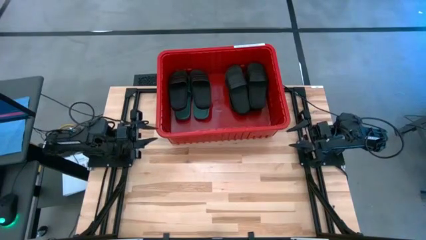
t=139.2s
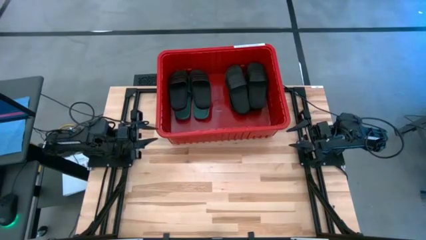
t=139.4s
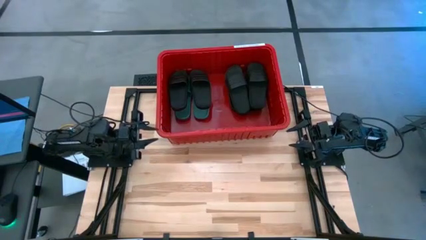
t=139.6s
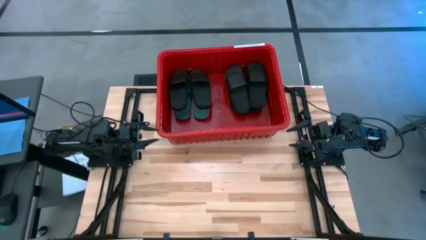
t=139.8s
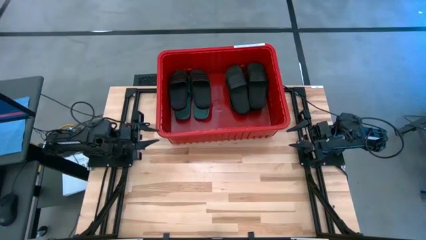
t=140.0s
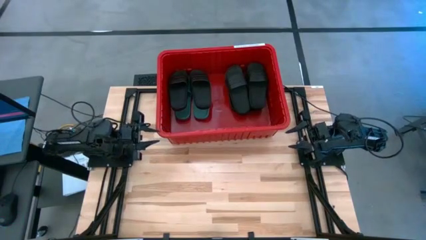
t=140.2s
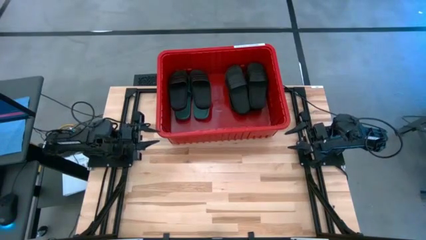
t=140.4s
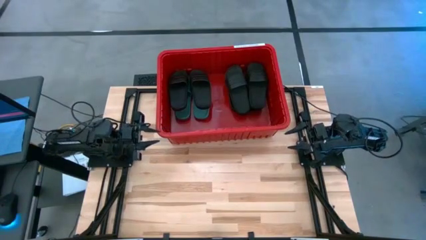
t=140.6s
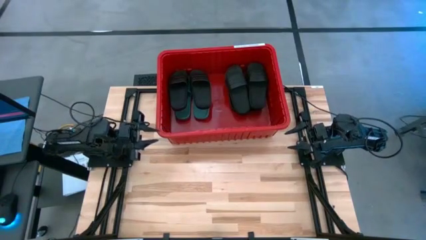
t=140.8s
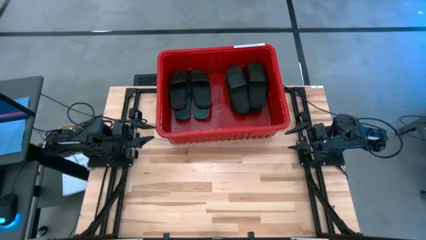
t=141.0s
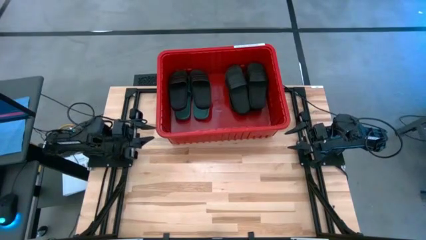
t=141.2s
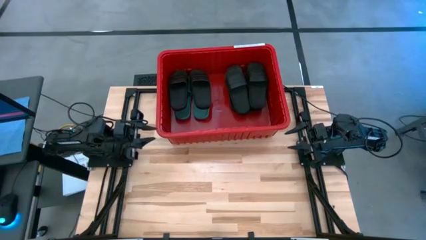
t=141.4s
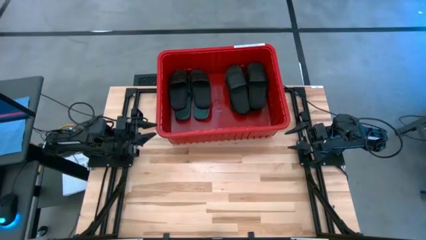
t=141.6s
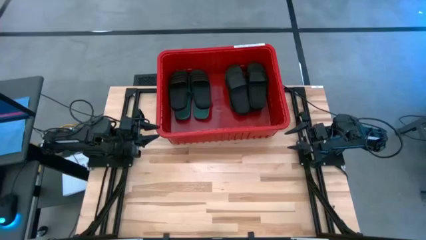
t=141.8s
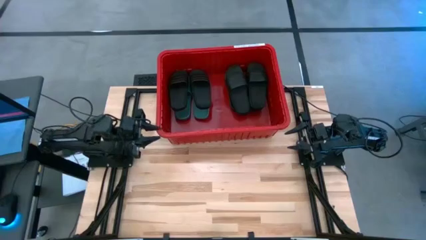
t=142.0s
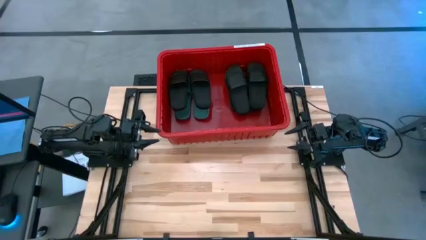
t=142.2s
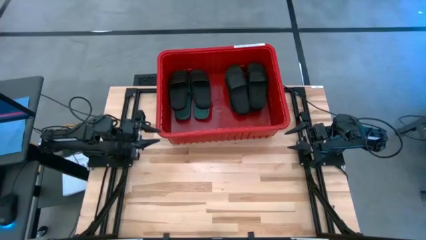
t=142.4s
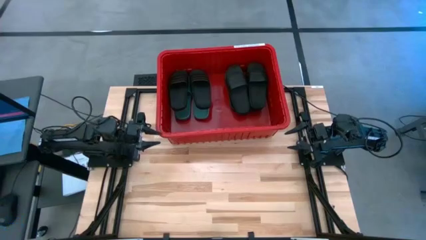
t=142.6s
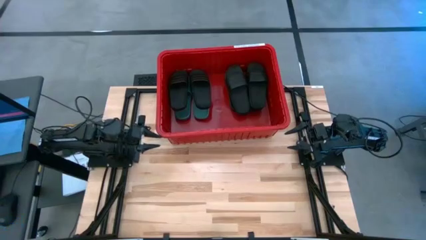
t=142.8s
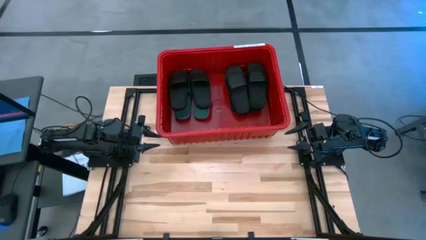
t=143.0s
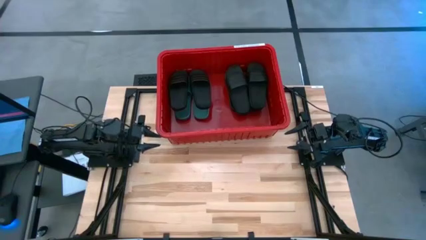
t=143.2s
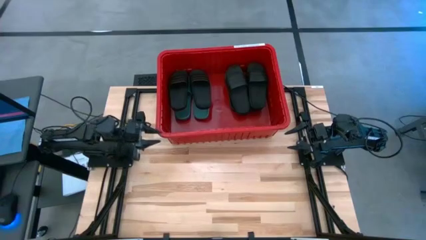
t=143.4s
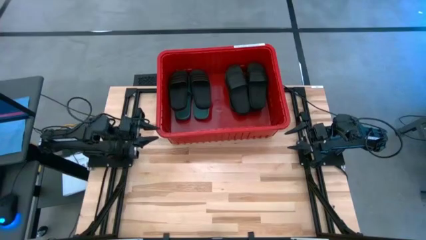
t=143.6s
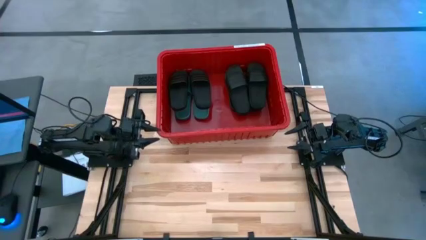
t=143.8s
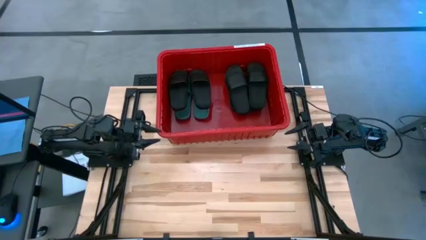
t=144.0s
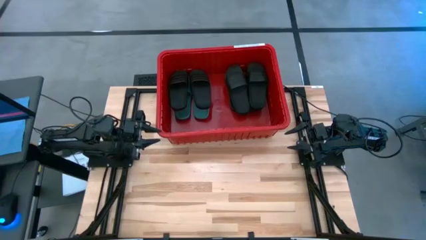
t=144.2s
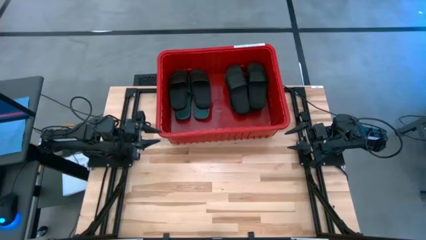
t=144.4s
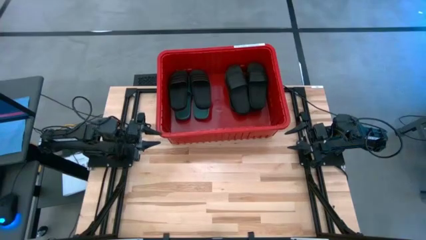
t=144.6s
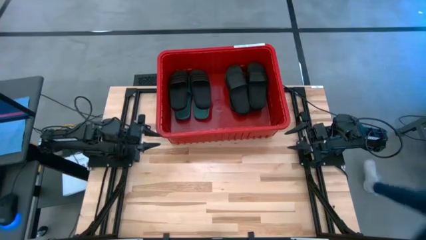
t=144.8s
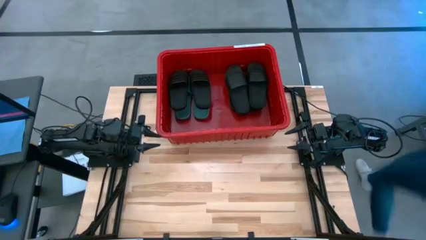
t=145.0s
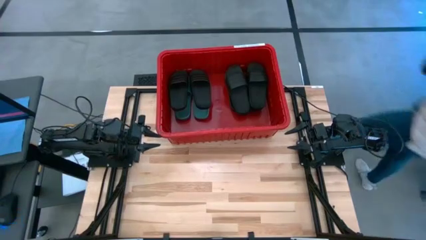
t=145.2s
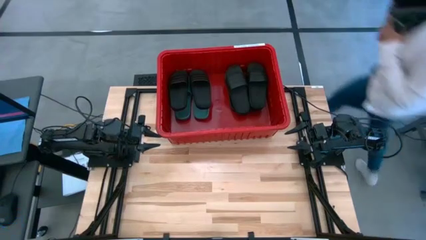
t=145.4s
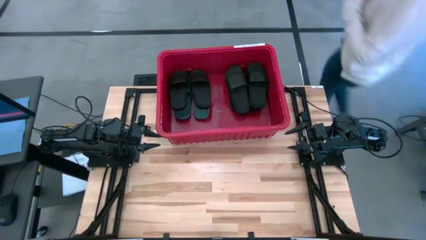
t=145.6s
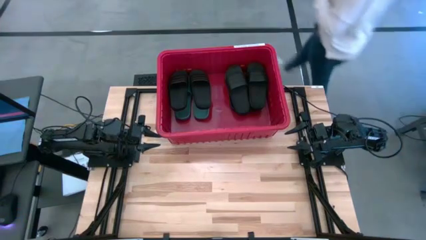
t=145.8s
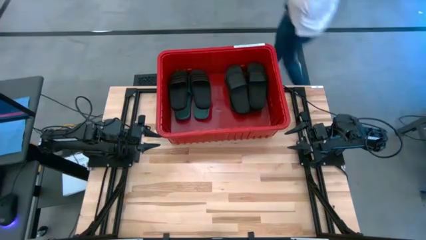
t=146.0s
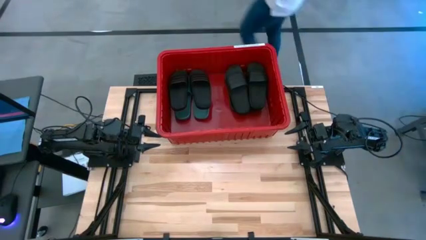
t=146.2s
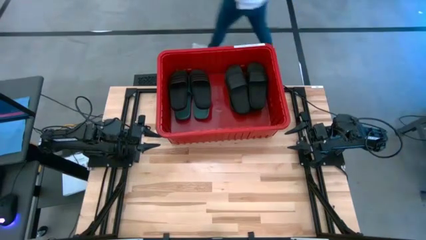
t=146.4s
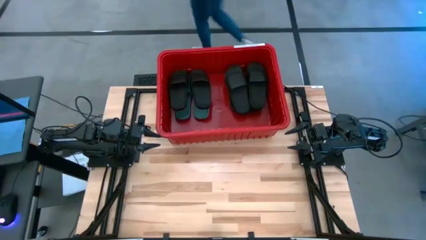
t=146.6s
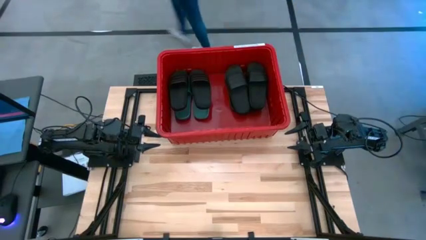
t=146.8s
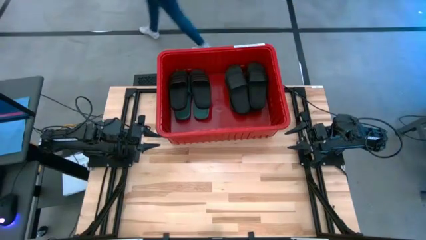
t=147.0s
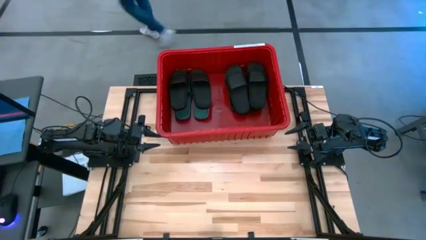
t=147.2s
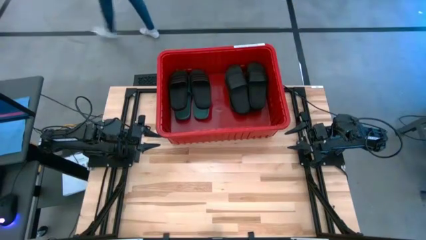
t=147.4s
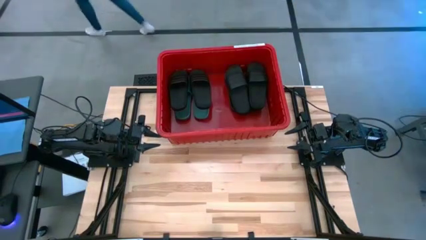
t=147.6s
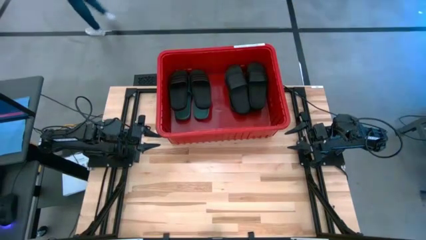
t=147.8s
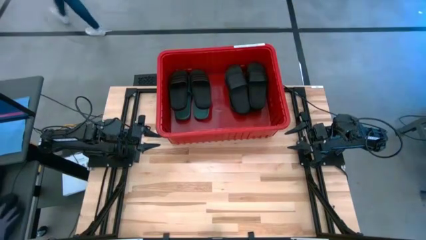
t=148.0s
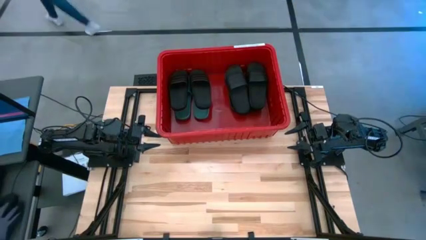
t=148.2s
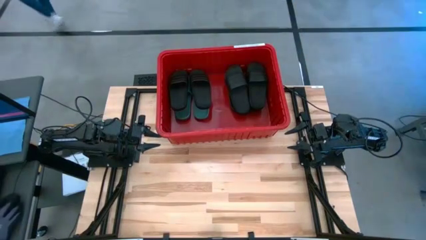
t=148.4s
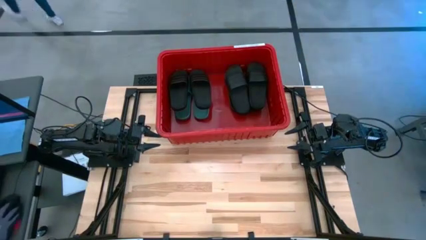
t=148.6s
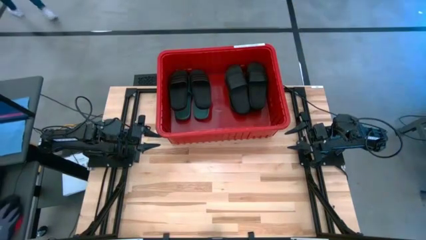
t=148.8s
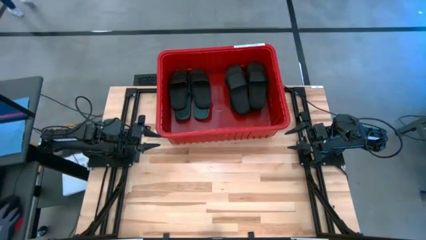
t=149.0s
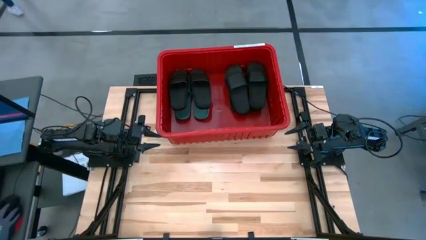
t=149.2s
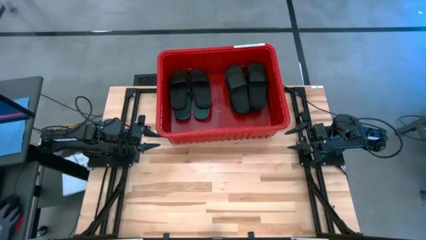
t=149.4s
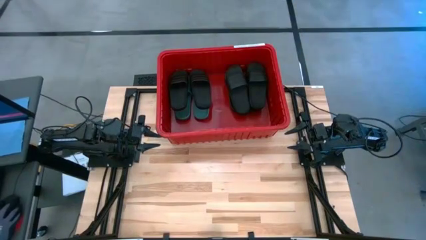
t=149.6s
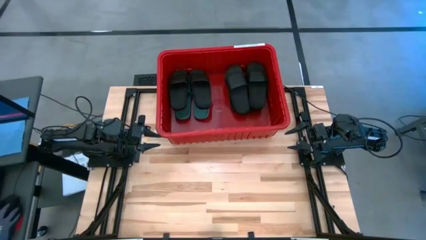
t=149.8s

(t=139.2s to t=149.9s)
Task: Pick and place slides into bin
Return to Home Position

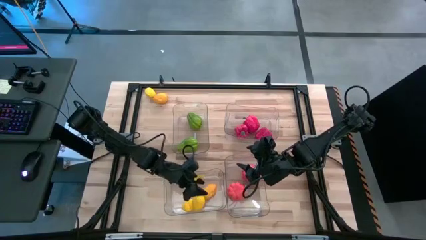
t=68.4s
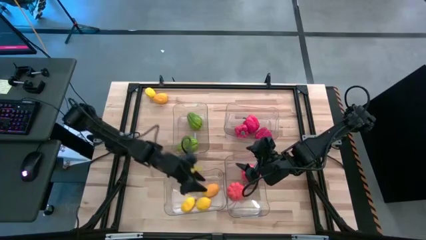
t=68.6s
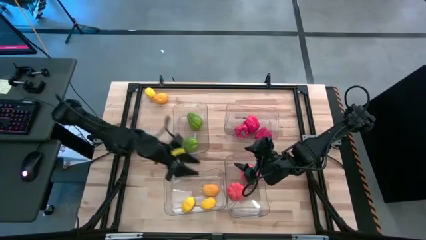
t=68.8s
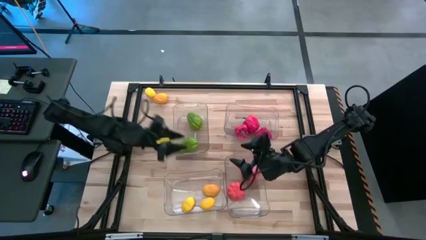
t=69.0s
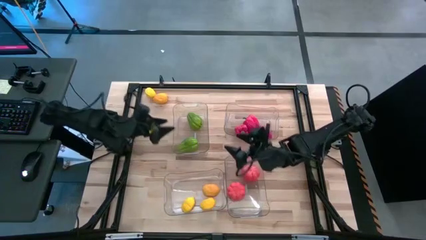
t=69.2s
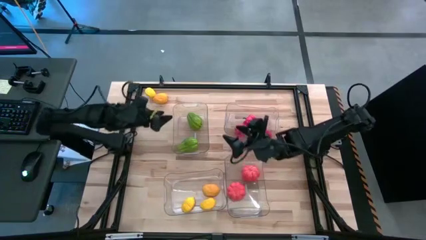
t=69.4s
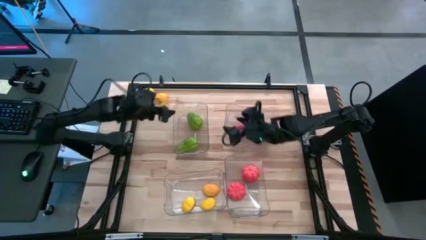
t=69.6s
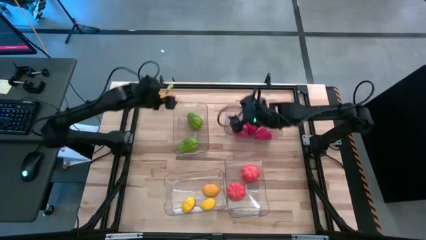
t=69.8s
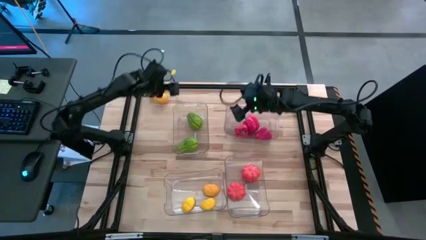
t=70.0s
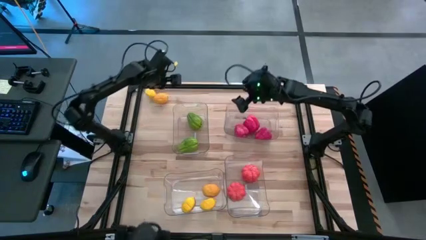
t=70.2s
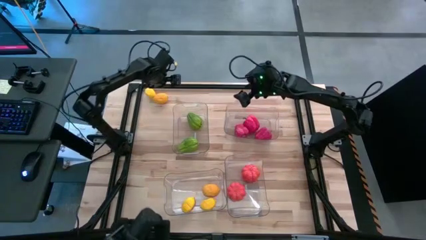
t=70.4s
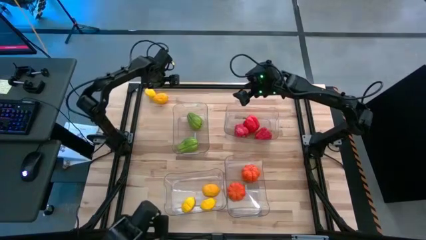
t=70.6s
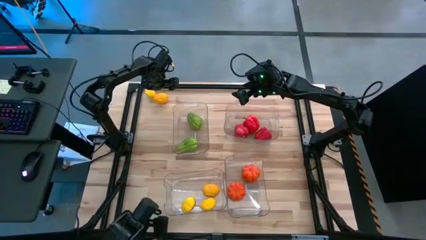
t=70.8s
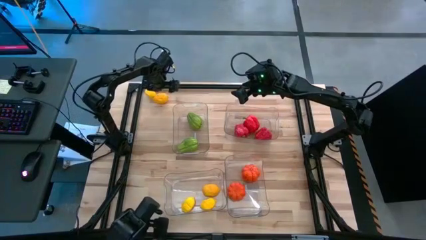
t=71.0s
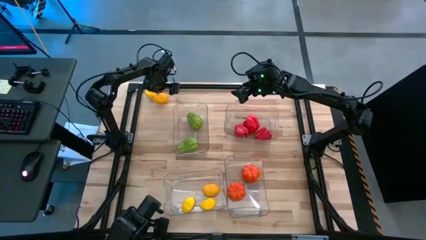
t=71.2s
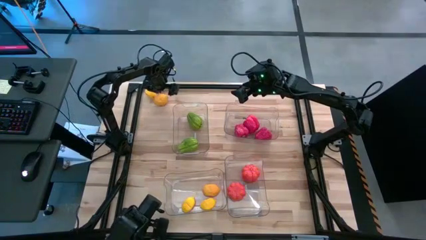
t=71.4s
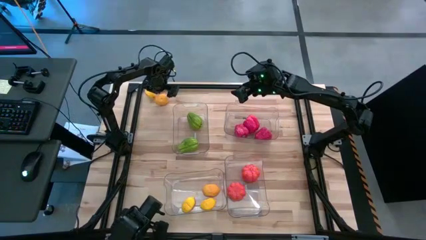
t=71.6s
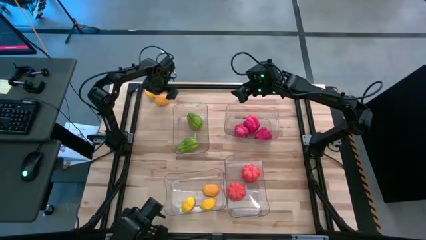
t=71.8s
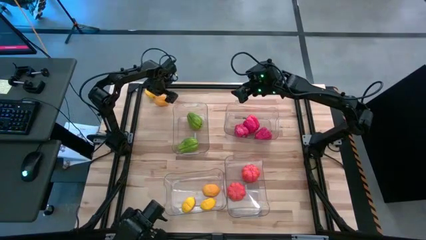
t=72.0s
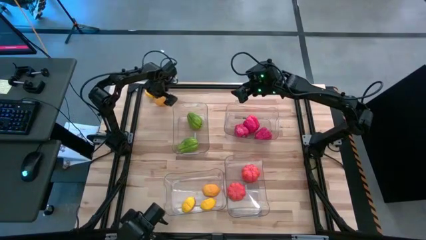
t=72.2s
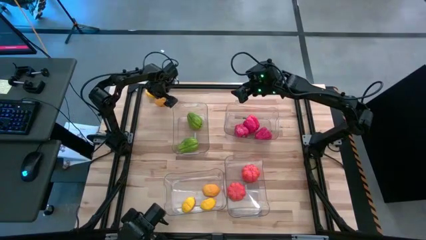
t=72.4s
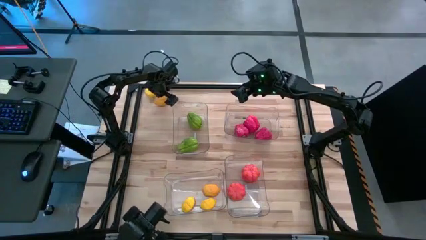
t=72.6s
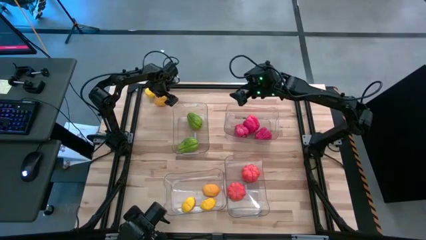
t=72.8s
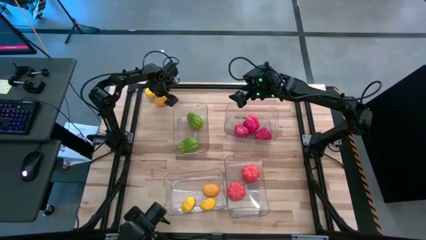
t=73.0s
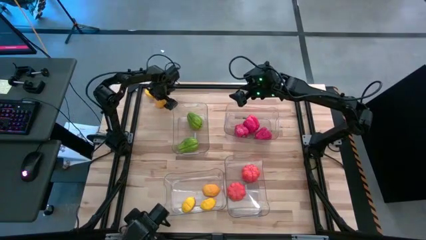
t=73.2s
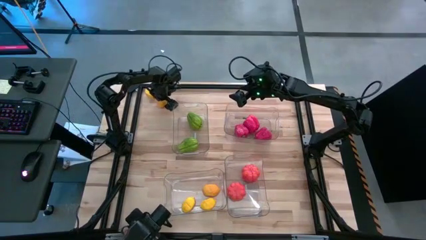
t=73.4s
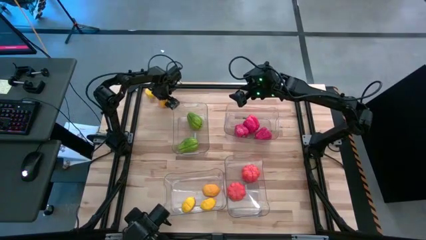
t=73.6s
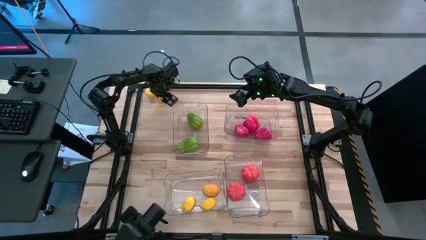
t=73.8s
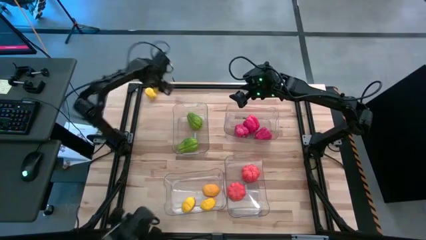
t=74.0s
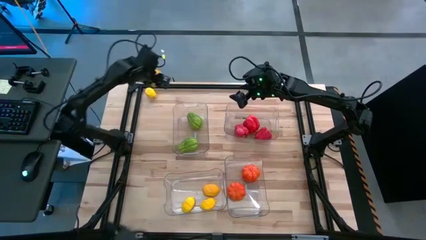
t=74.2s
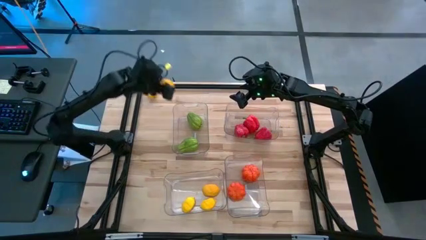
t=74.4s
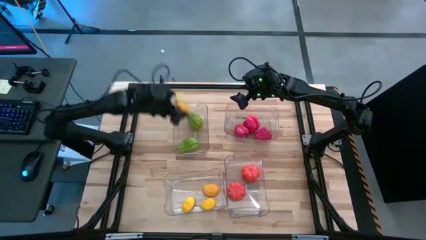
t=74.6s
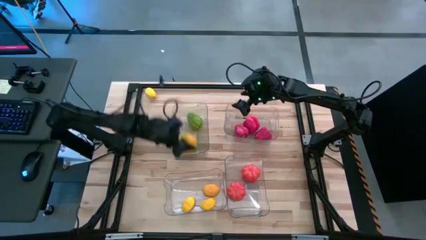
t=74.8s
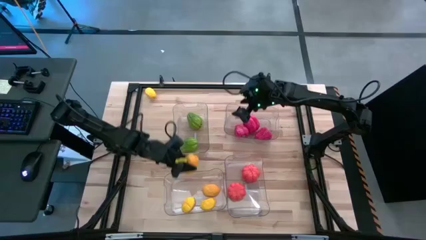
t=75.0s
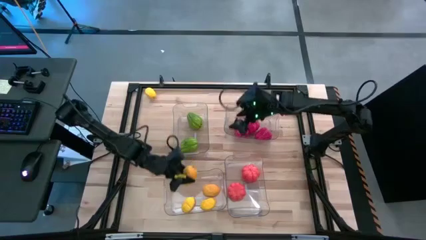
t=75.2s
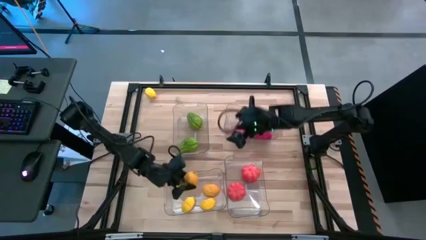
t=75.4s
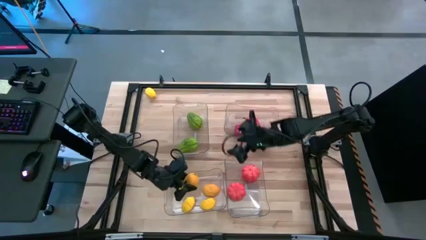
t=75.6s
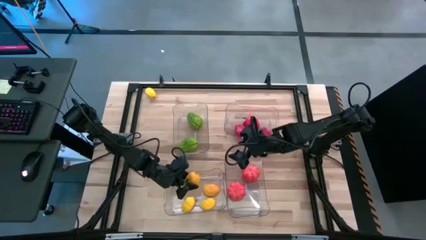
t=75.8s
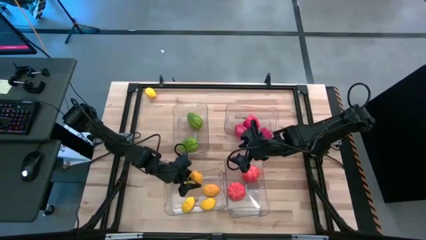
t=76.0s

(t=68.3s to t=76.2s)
Task: Sort produce into baskets
Put the right lemon into the bottom left transparent bin
